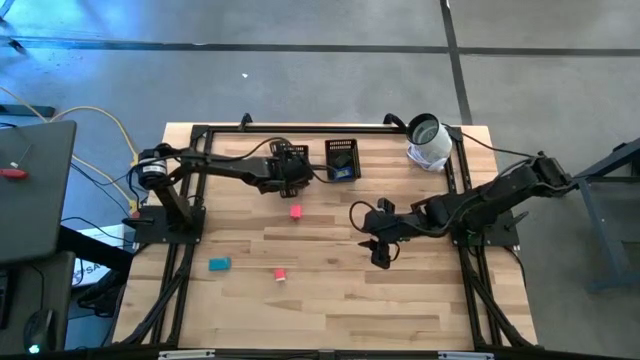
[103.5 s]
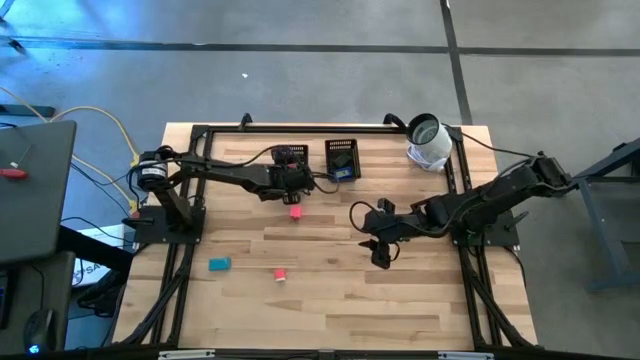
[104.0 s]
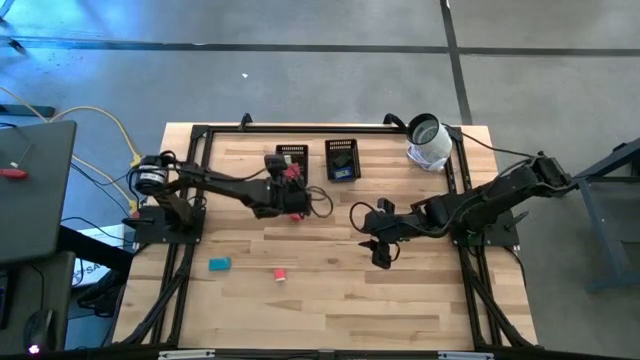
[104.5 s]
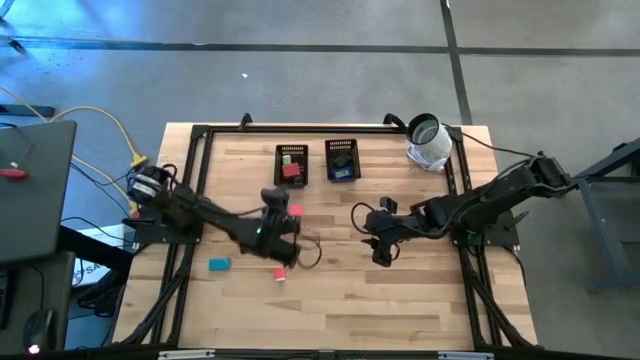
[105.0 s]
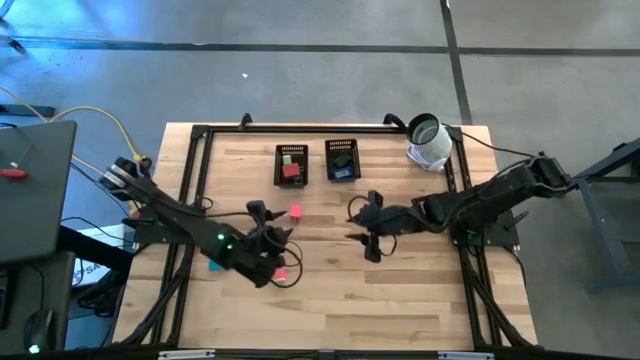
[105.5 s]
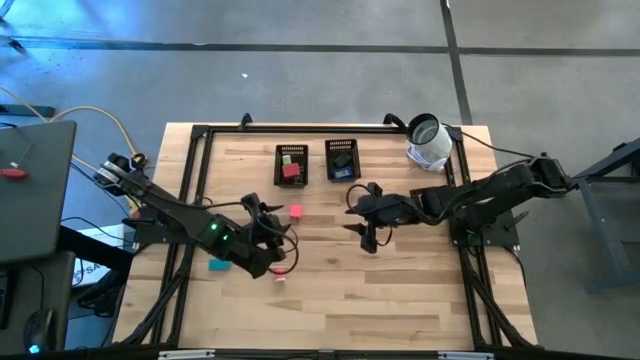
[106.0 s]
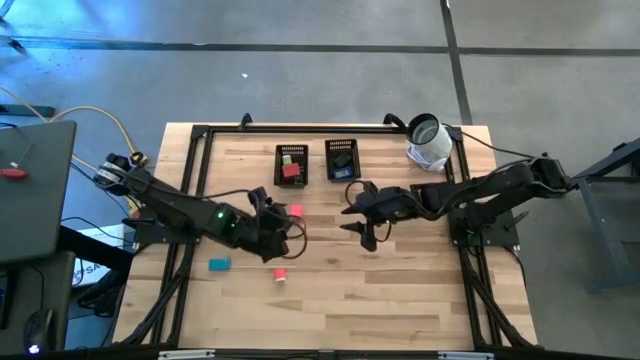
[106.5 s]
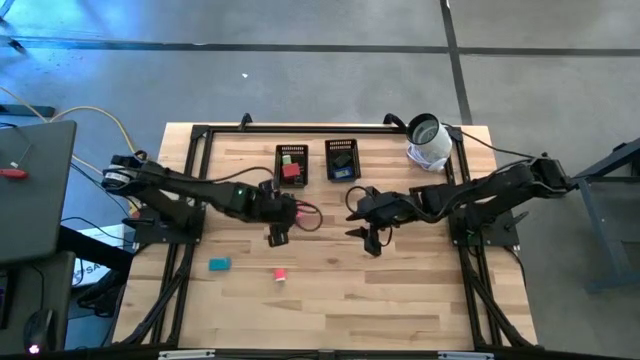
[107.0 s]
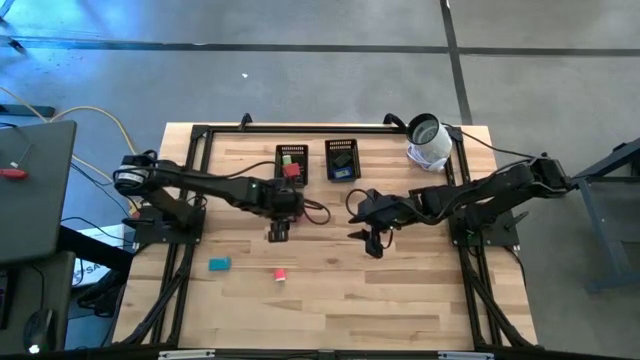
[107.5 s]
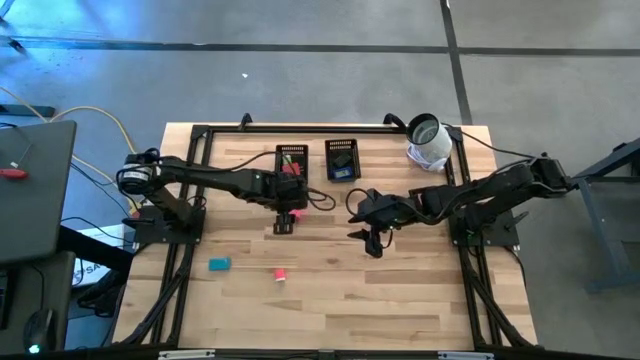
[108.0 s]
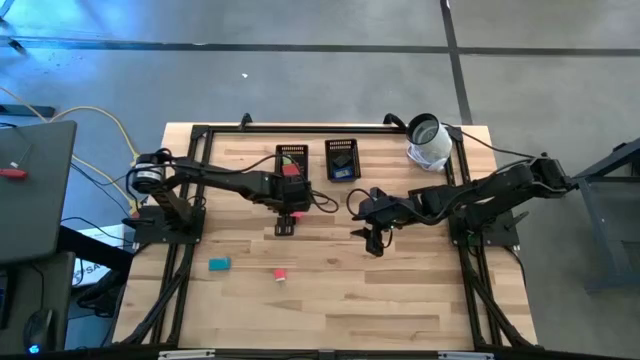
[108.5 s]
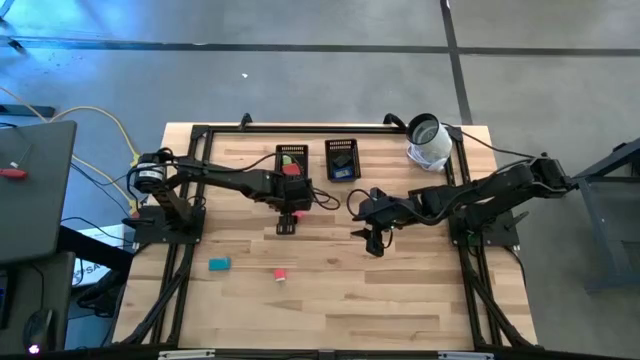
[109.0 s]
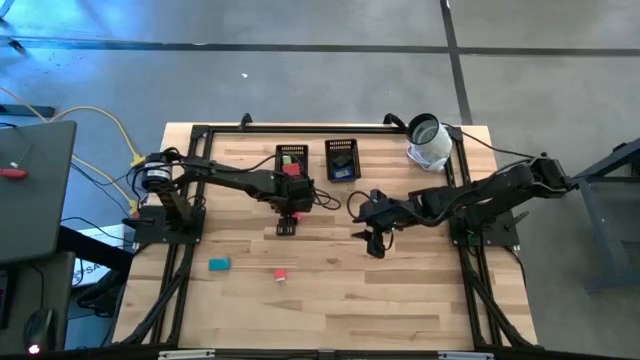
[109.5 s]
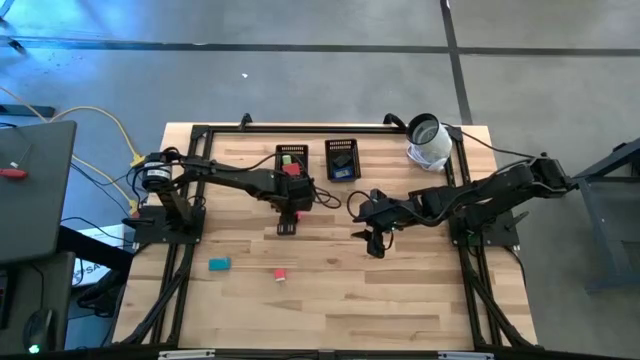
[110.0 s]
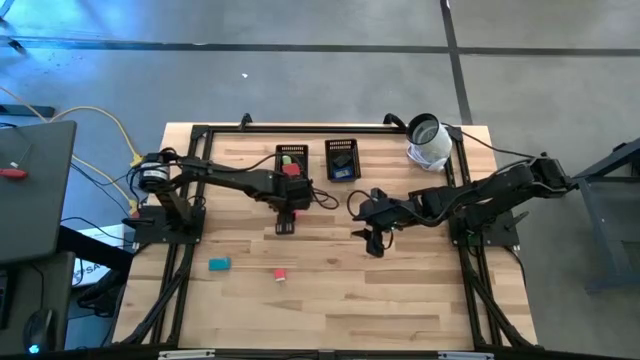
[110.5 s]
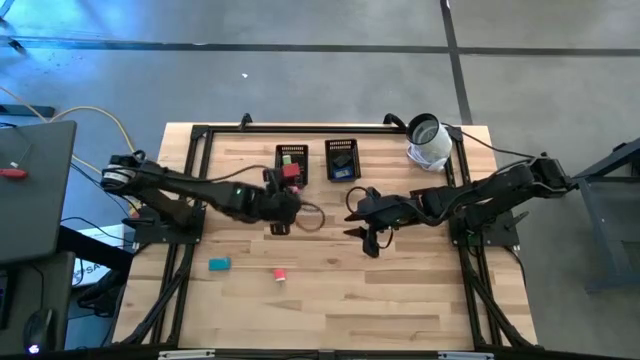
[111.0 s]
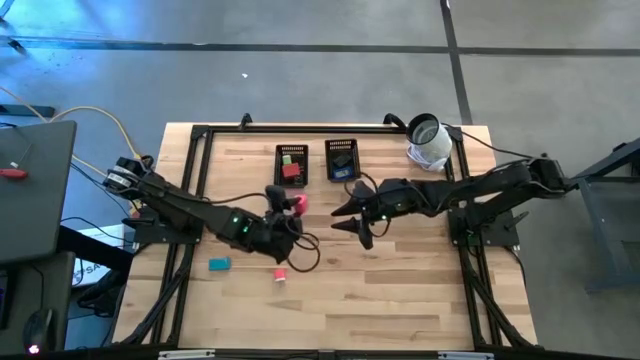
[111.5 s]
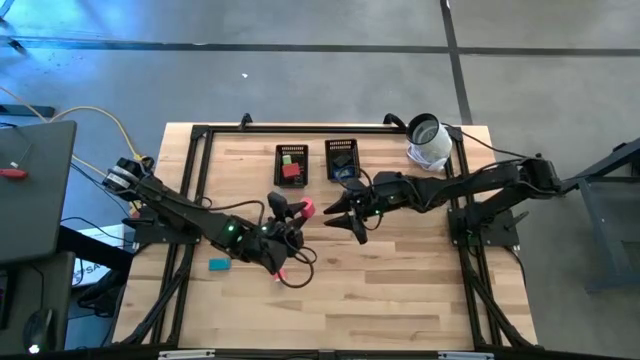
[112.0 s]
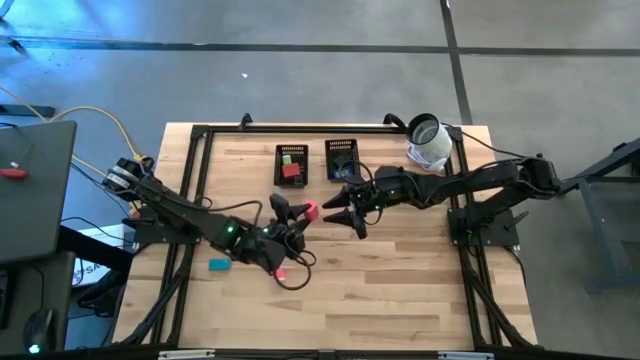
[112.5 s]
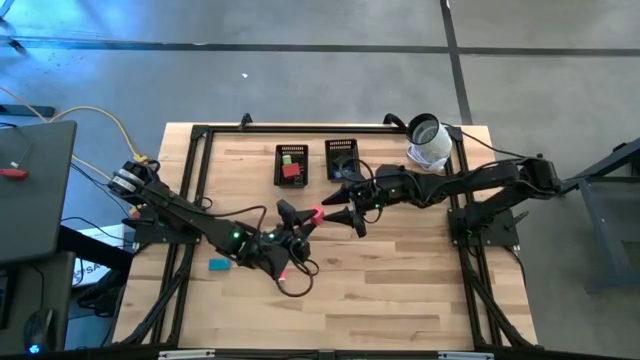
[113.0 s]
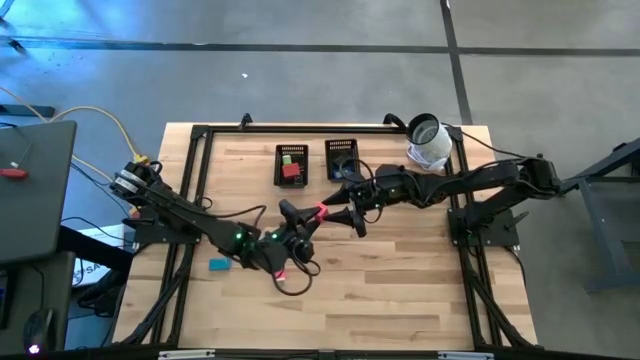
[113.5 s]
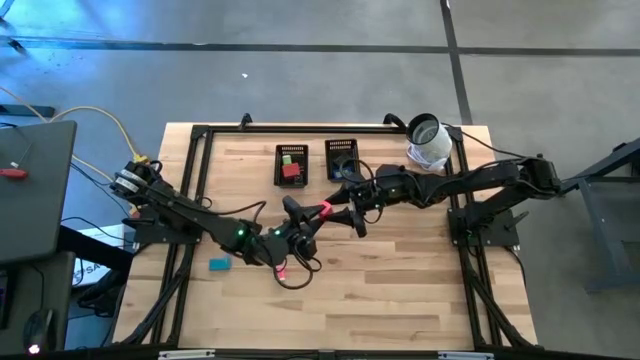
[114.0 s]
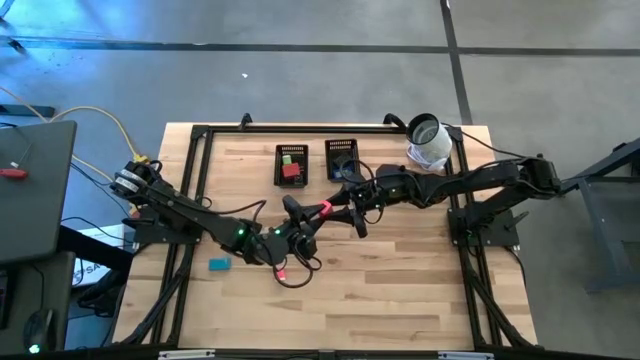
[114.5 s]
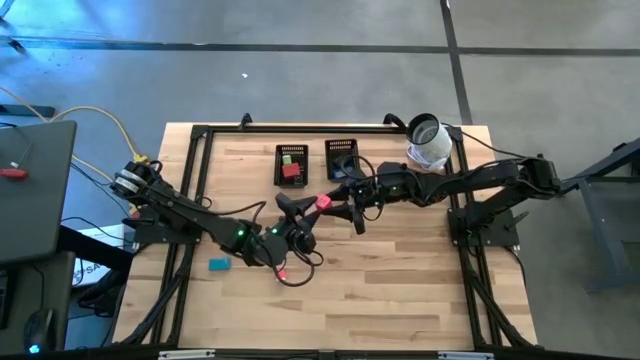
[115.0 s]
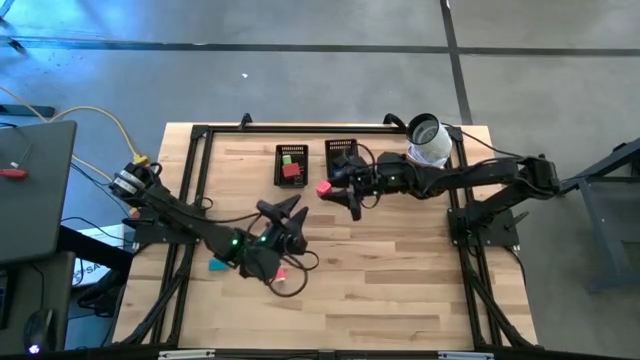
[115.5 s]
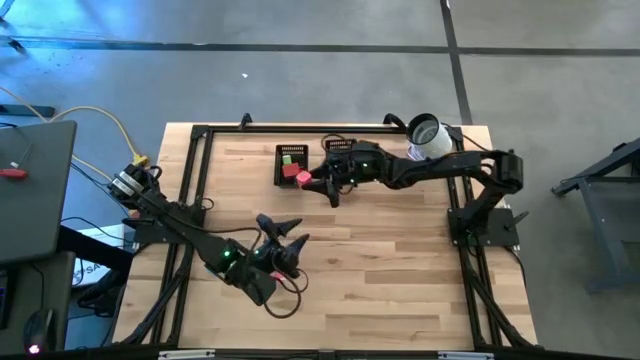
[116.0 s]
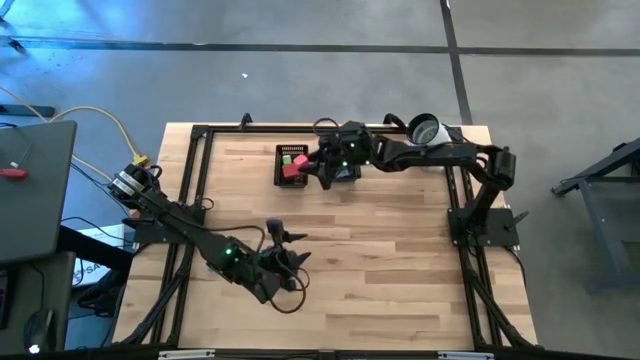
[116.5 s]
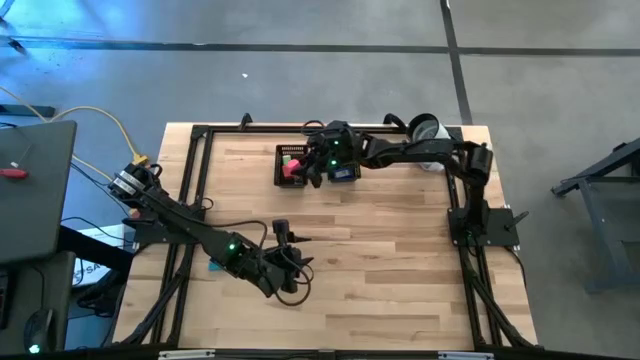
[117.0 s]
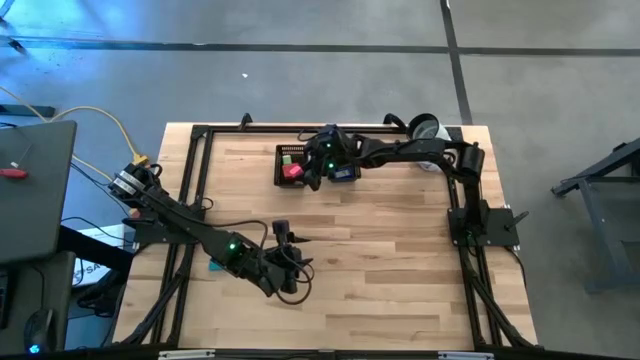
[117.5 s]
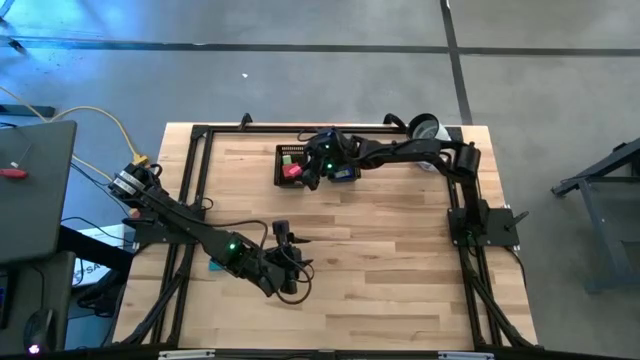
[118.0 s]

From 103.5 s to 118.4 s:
Task: Pick & Place Office items
Put the pink charger adapter into the left black bin

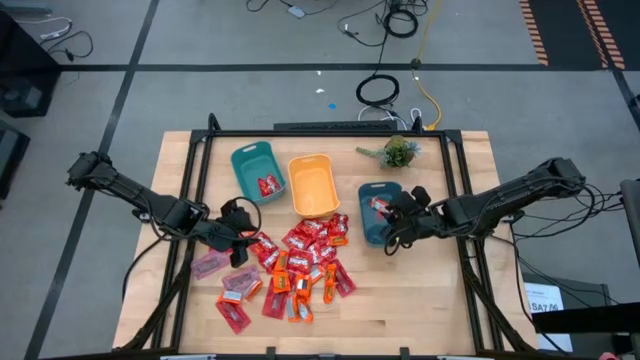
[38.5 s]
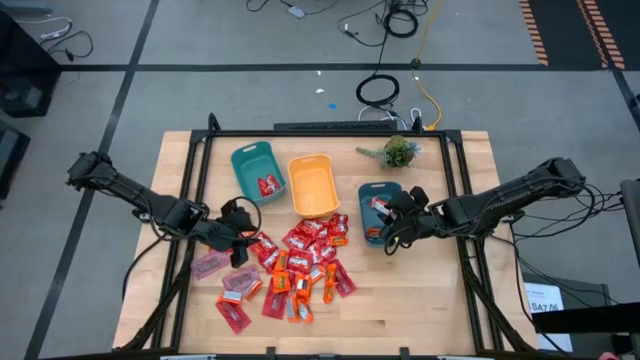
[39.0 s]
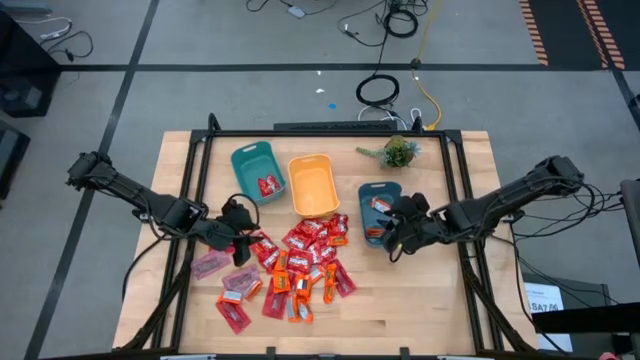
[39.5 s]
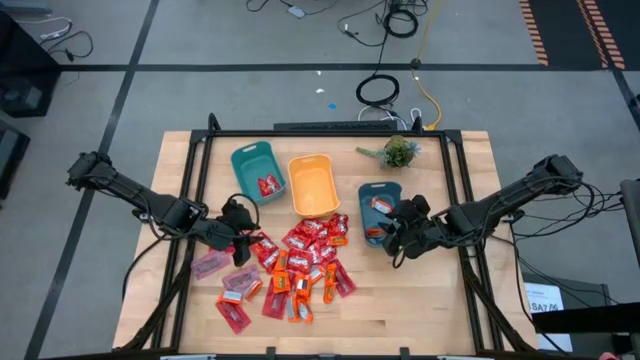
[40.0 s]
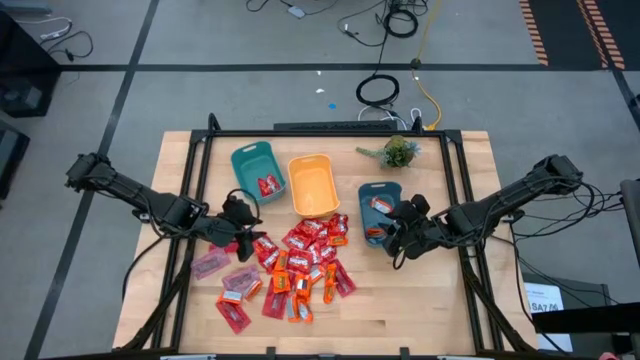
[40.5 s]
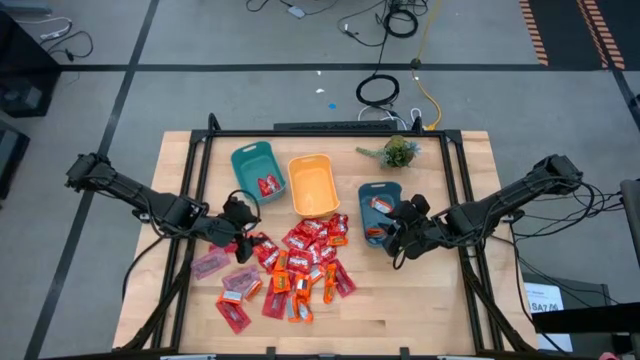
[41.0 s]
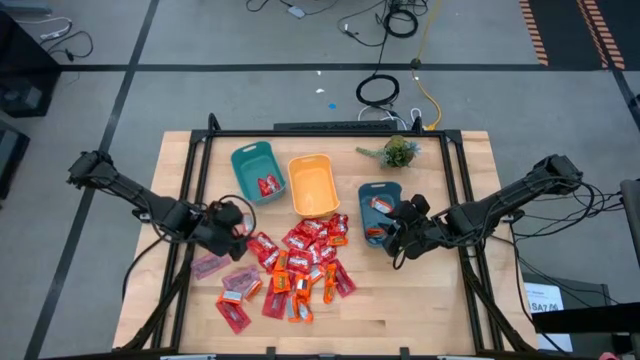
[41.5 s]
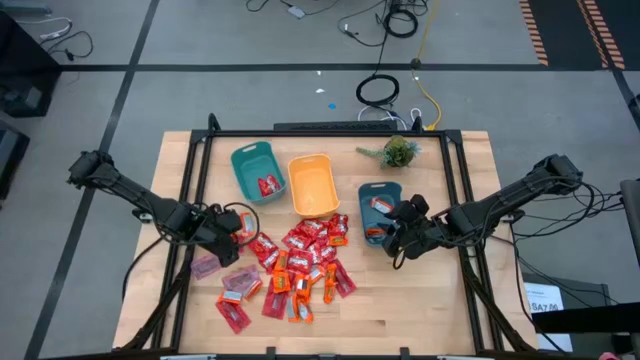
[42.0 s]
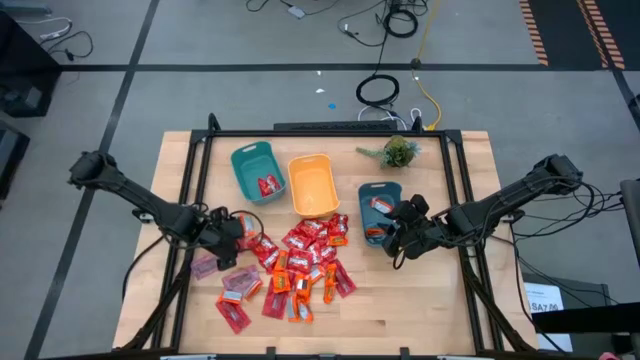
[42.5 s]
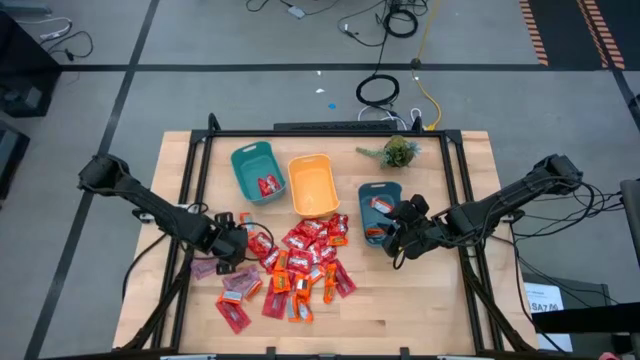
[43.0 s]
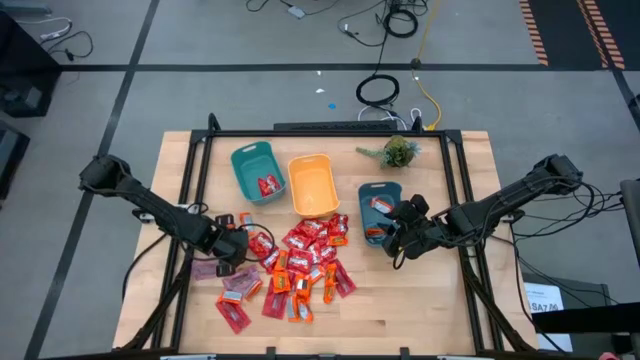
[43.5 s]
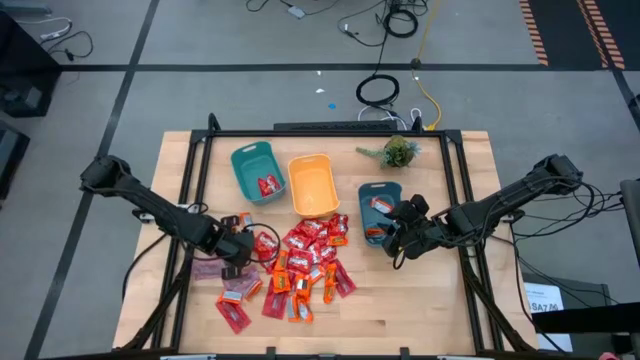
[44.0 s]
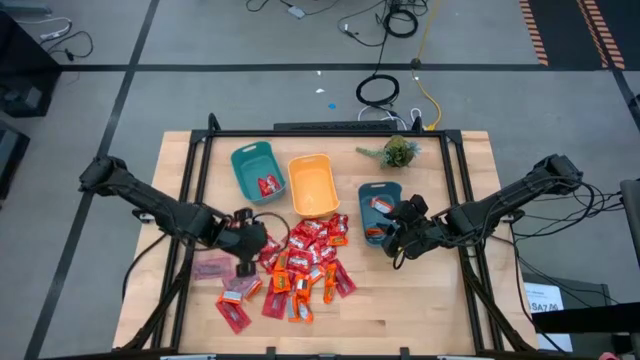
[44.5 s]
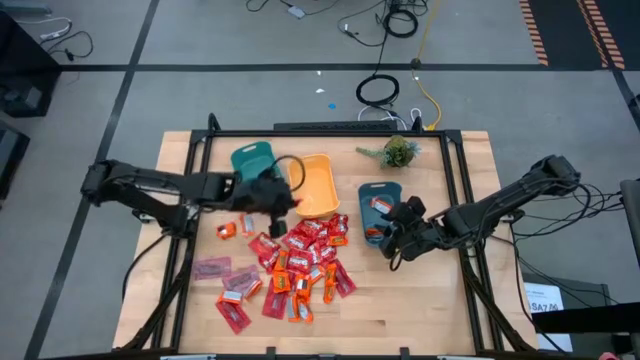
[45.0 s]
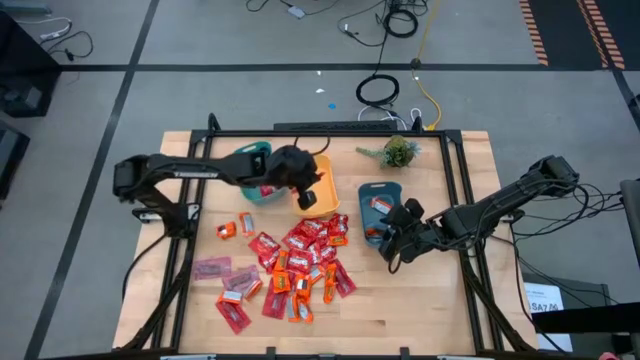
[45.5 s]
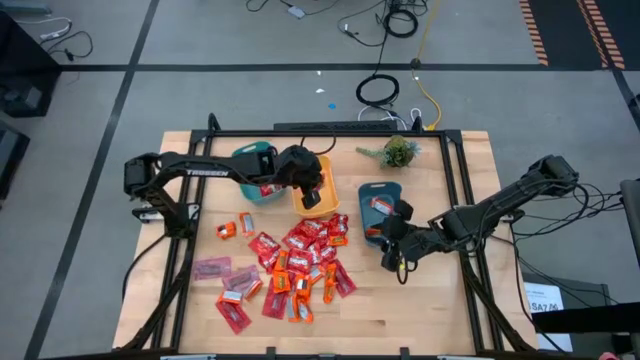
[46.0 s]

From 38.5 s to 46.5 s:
Task: Sort candy
Put the red wrapper candy into the yellow bin
